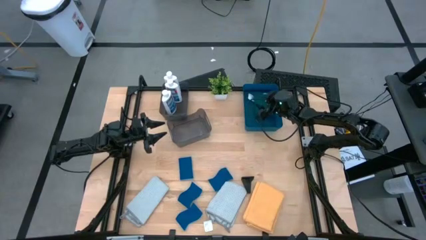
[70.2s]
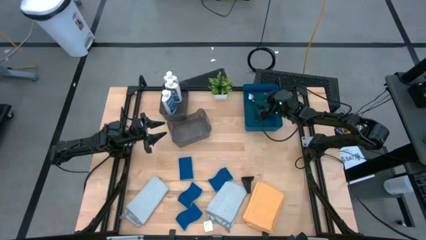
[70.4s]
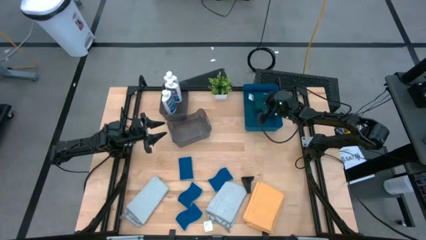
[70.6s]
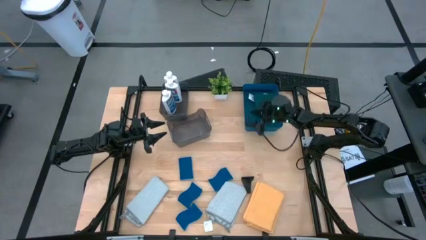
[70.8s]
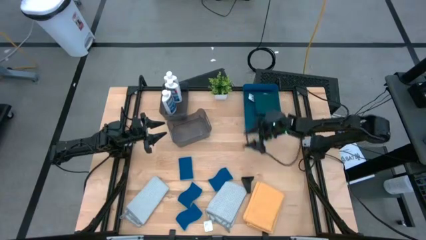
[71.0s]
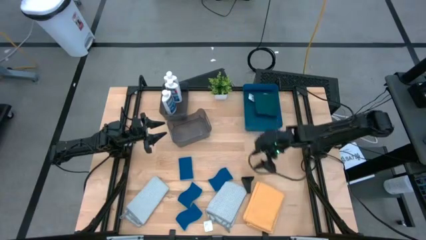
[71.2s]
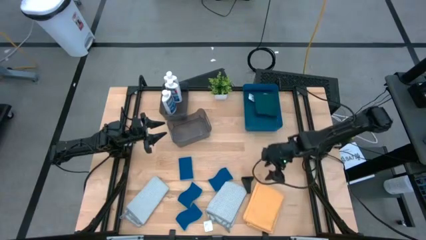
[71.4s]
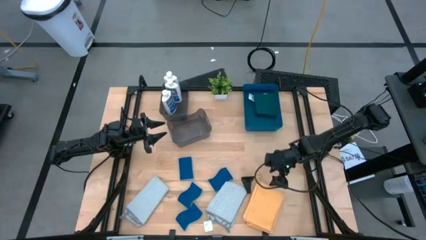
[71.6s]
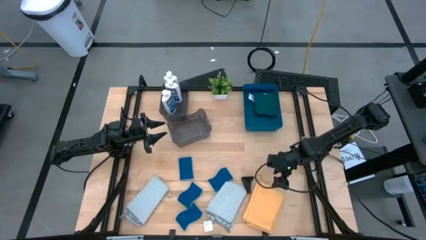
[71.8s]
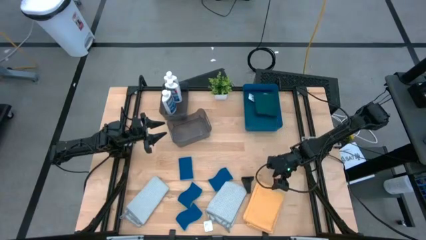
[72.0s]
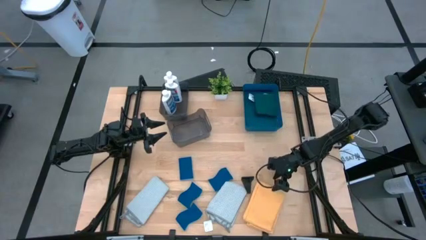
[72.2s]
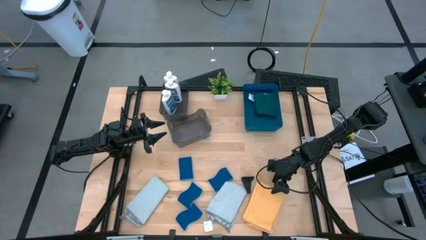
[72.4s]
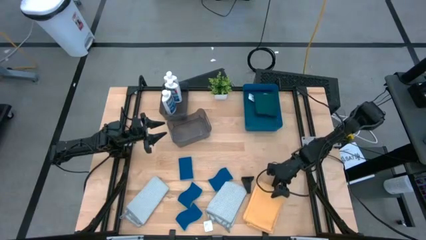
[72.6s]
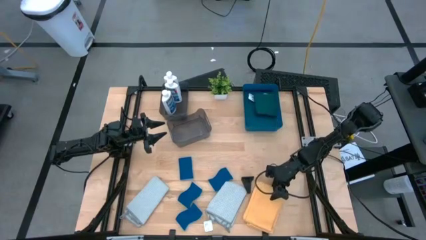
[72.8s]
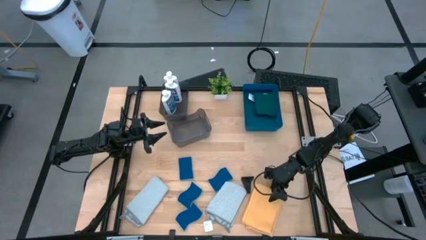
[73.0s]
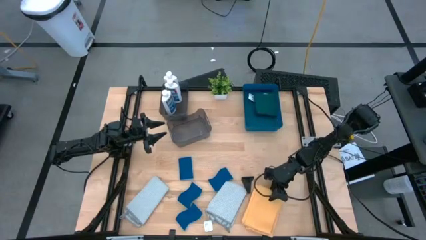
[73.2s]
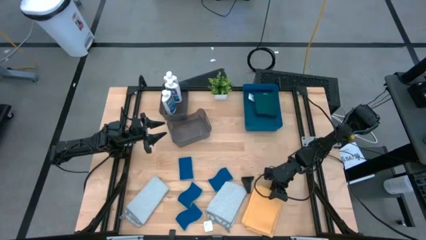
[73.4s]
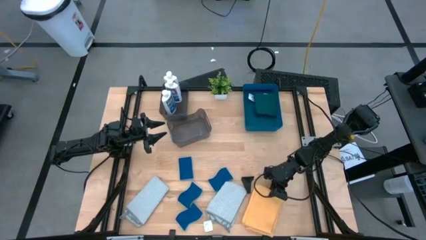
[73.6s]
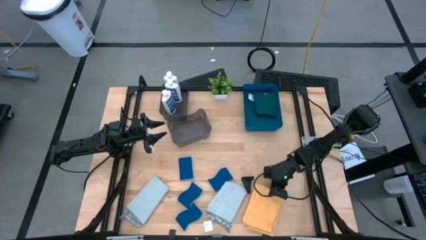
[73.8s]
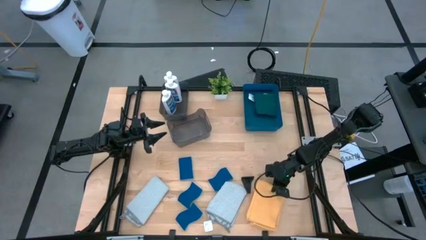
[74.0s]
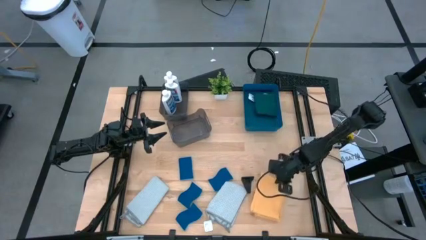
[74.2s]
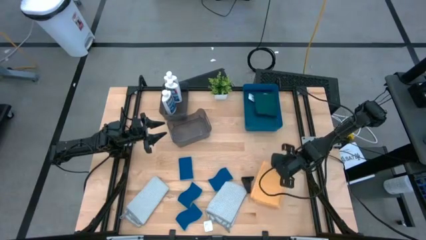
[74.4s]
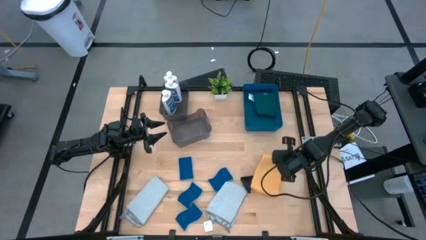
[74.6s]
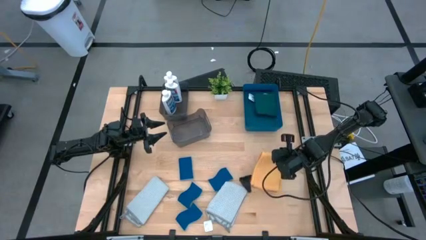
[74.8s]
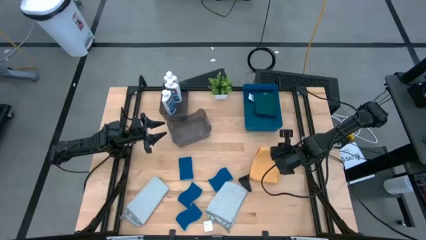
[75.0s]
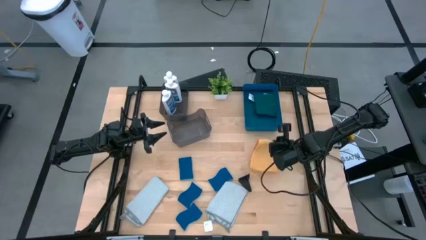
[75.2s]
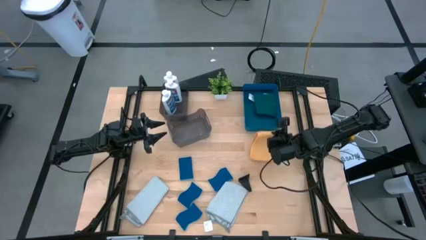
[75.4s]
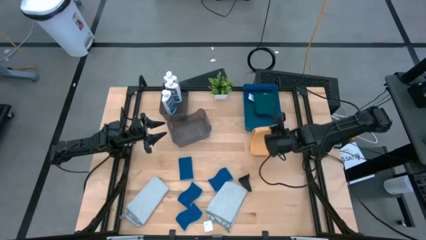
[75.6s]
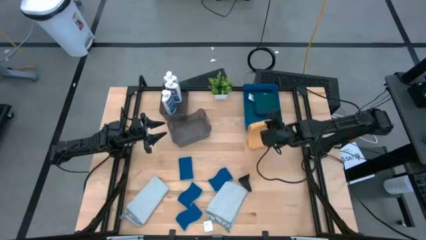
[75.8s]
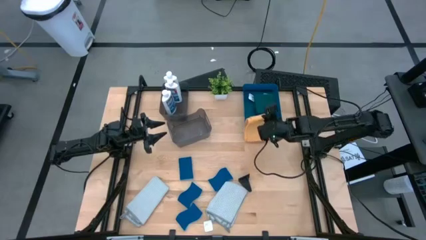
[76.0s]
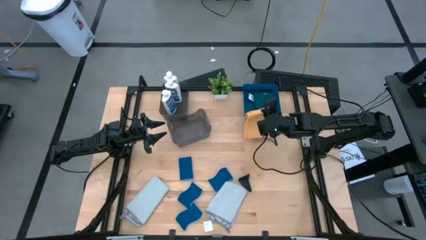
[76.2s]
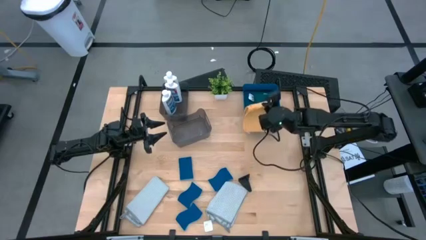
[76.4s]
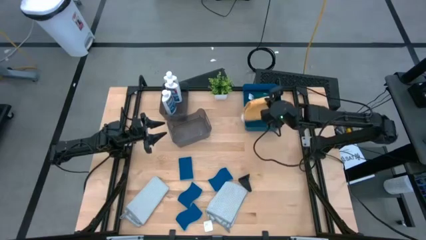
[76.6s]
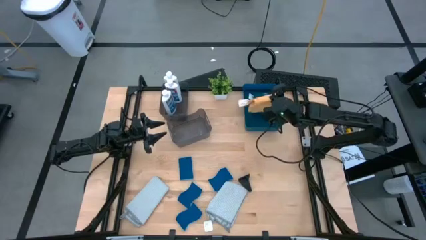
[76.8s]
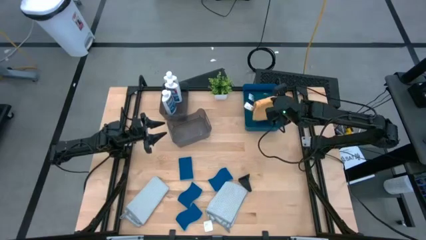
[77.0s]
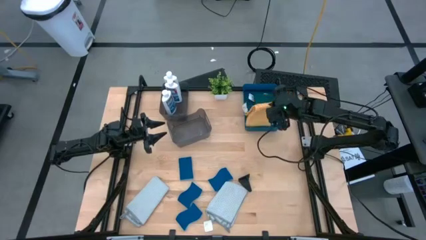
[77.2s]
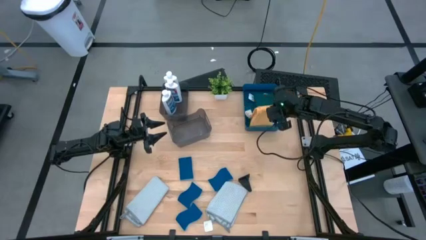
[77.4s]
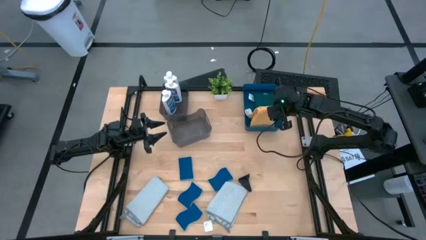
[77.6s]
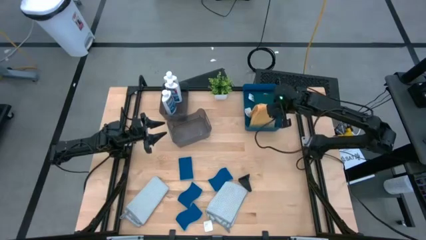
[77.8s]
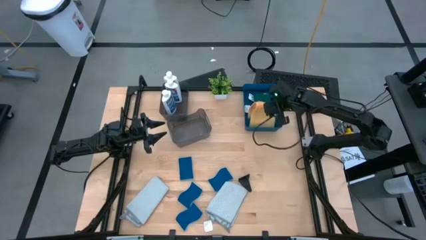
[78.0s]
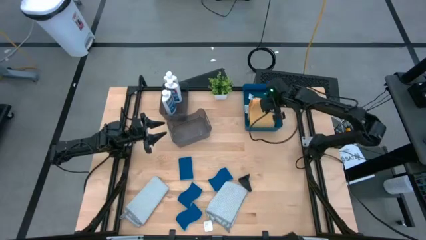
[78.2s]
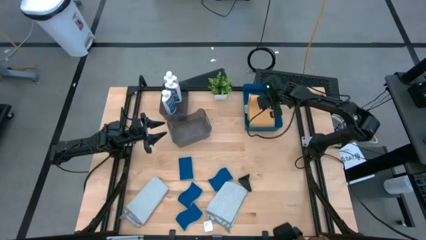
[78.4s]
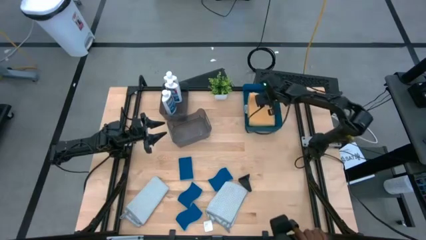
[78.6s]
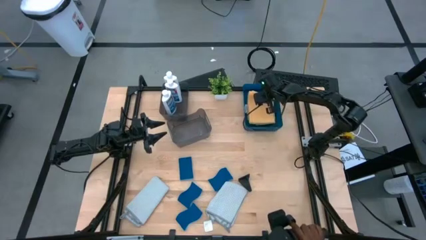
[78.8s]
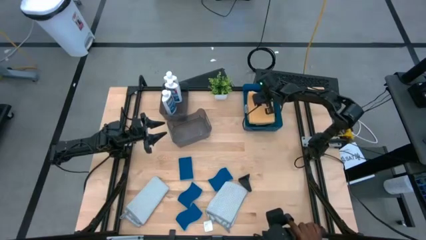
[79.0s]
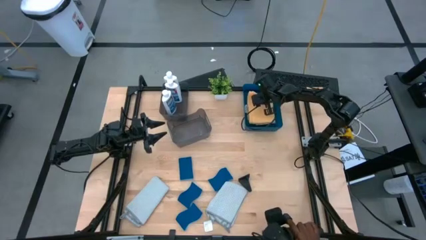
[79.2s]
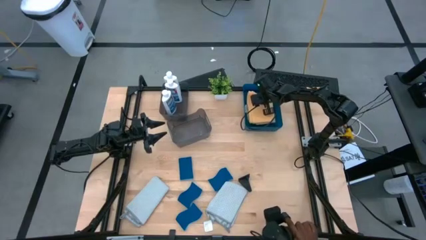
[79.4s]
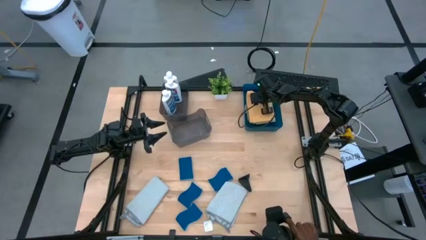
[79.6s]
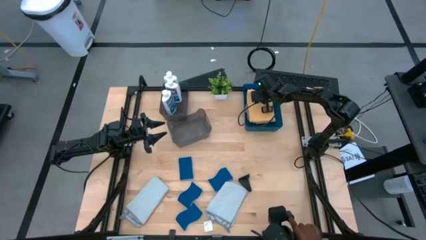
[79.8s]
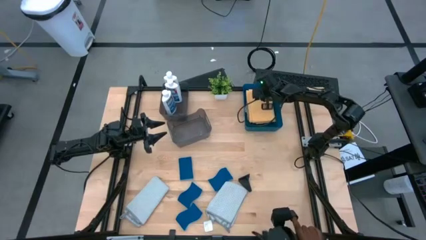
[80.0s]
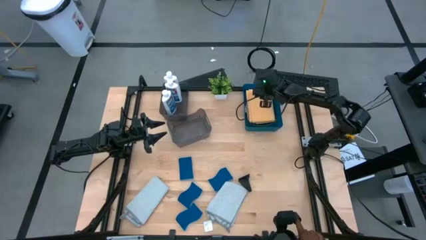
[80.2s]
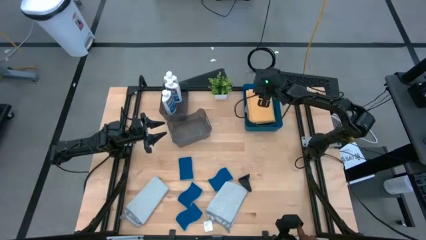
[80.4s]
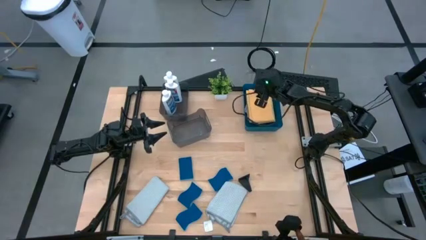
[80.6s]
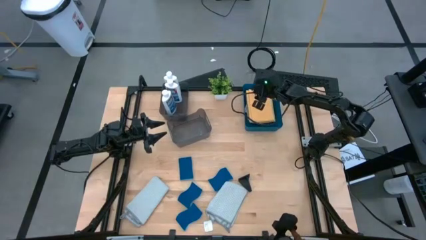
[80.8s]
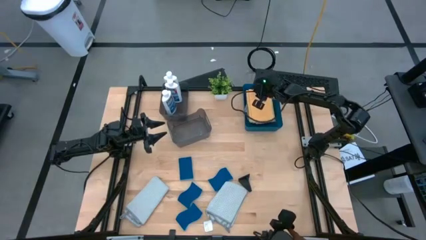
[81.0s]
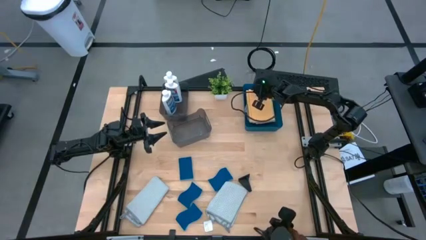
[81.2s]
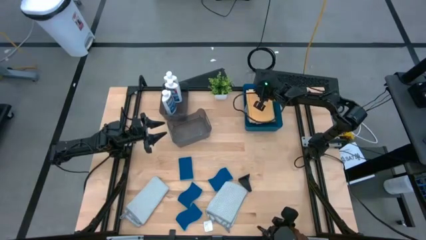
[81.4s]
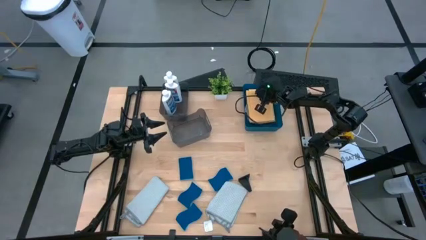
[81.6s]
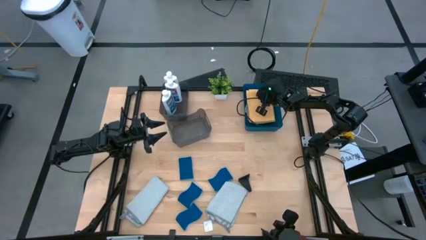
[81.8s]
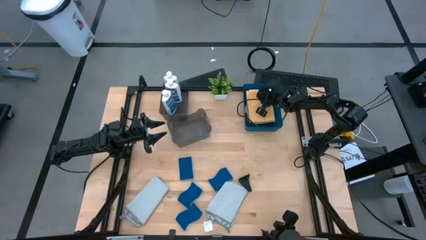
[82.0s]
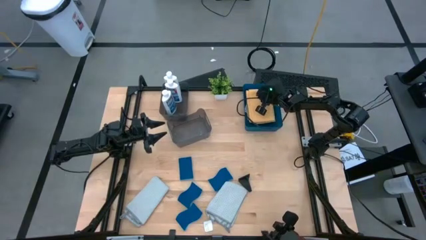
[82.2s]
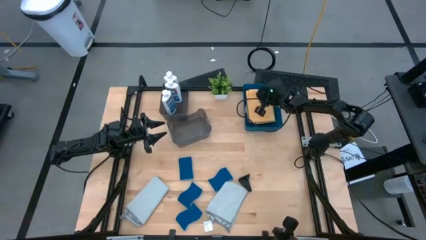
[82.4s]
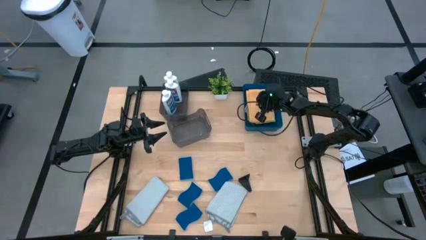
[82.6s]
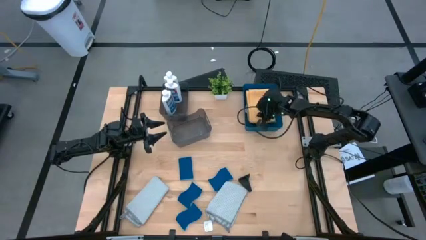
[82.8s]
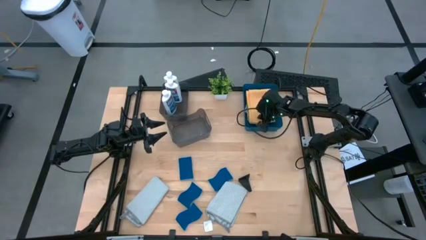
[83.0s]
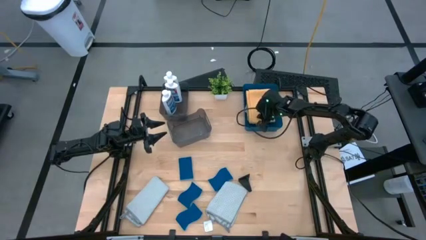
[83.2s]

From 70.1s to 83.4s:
Task: Pick & Place Kitchen Items
Put the yellow towel into the blue bin

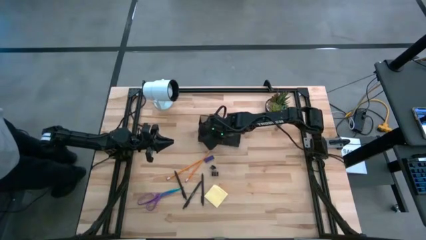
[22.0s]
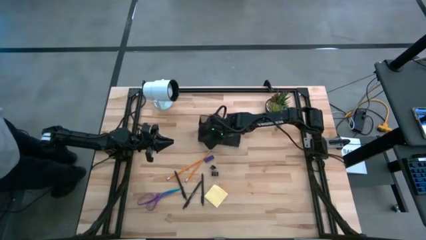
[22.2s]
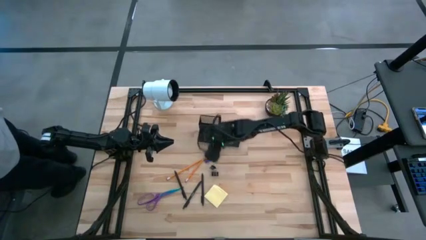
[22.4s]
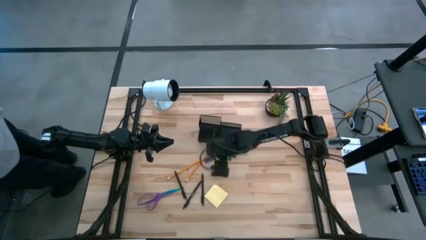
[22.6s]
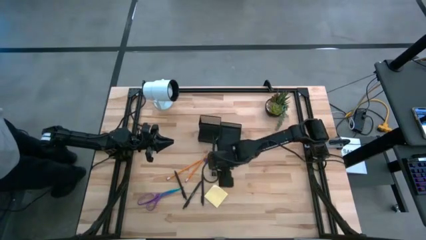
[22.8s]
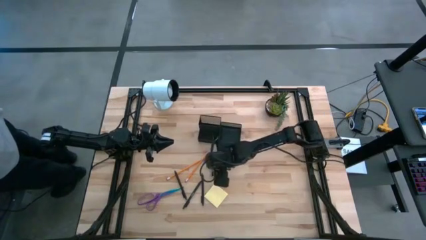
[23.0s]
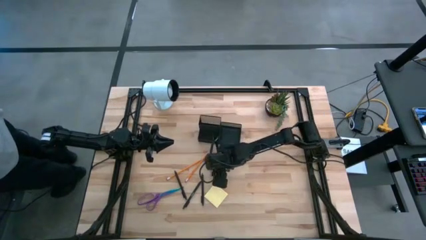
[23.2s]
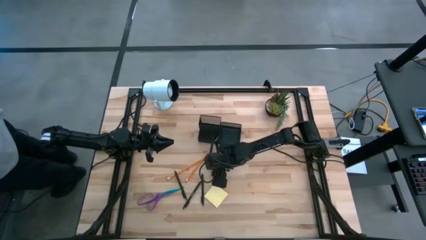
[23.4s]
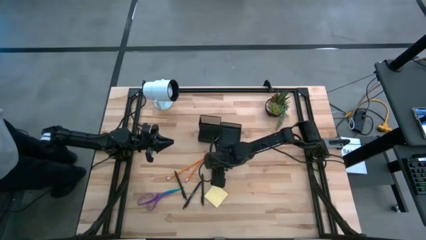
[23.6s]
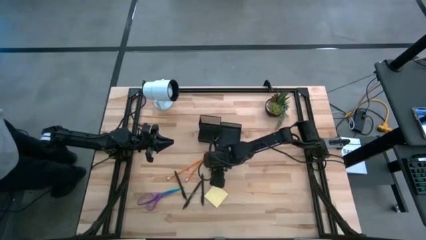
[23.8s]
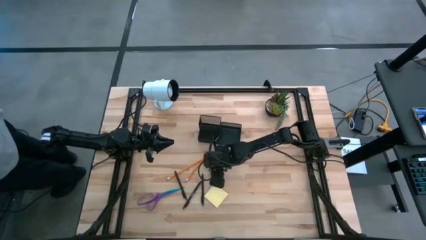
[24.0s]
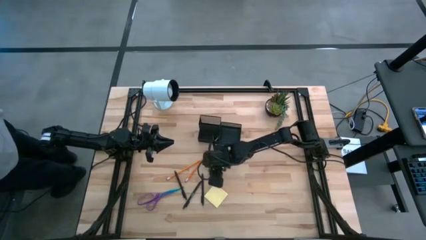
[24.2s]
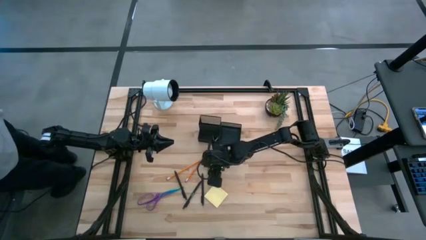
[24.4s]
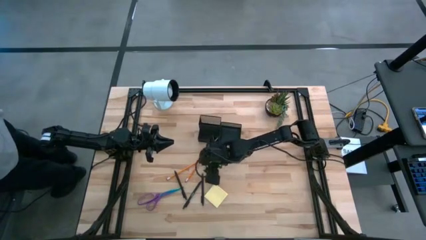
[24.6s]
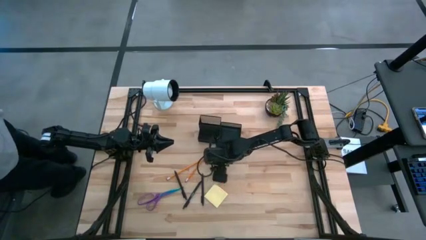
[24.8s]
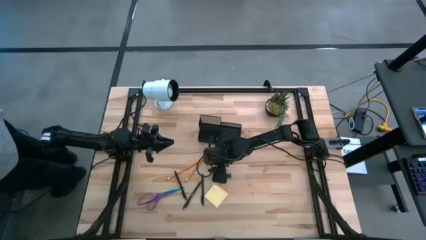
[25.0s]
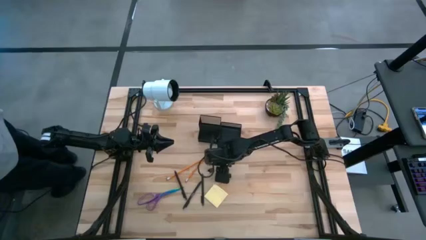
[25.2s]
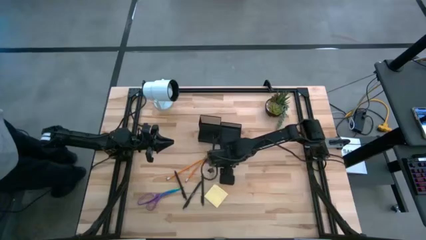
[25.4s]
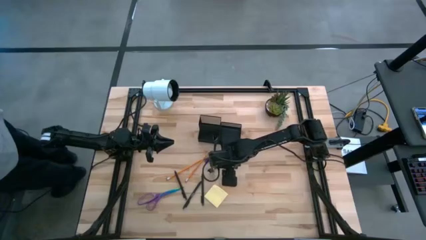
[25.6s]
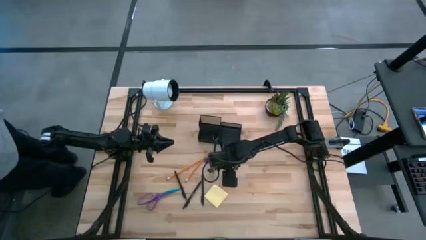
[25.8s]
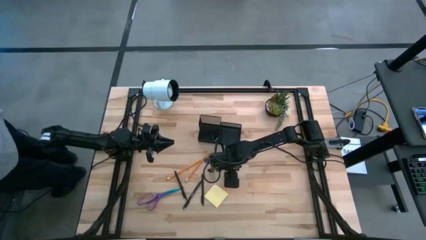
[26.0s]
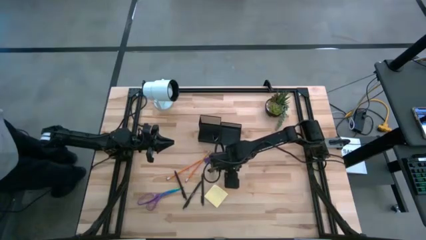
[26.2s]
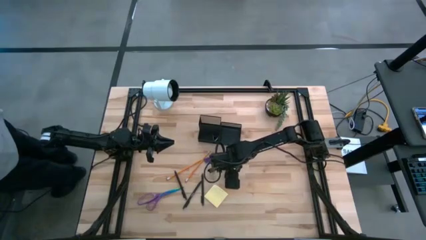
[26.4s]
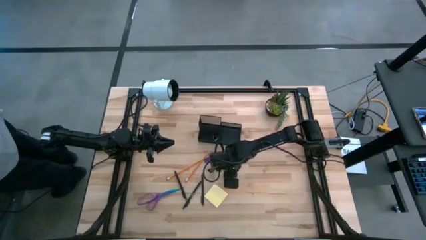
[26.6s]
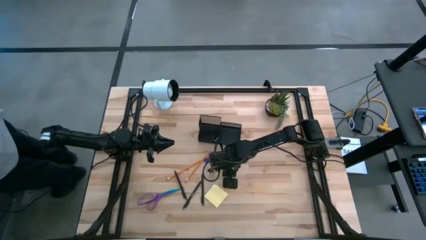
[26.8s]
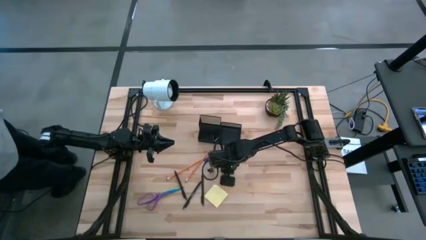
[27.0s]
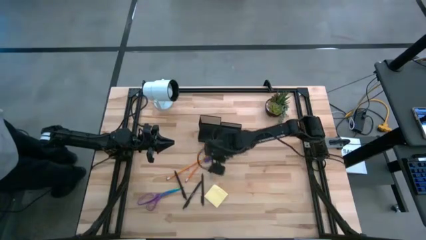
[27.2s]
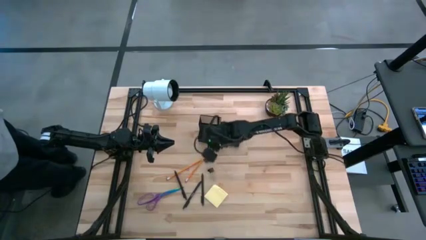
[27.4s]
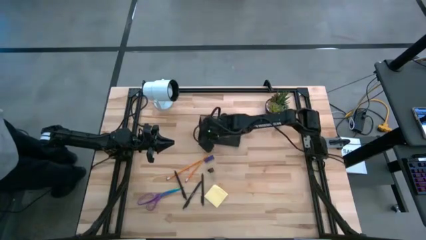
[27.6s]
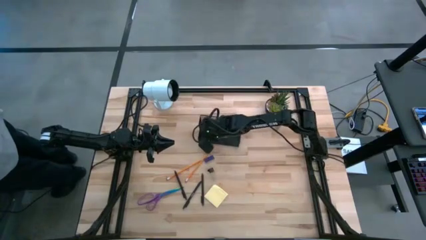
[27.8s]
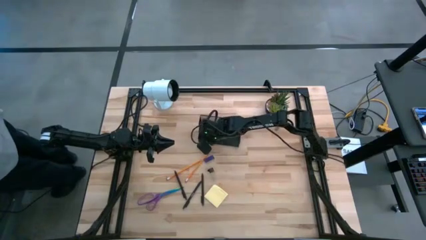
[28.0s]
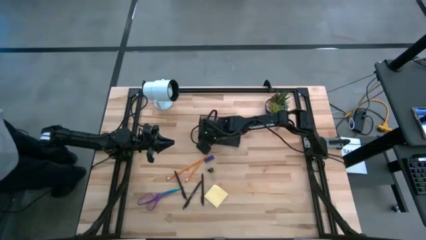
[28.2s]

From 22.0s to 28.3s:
Task: Pick and place office supplies into organizer
Put the right black binder clip into the black desk organizer
